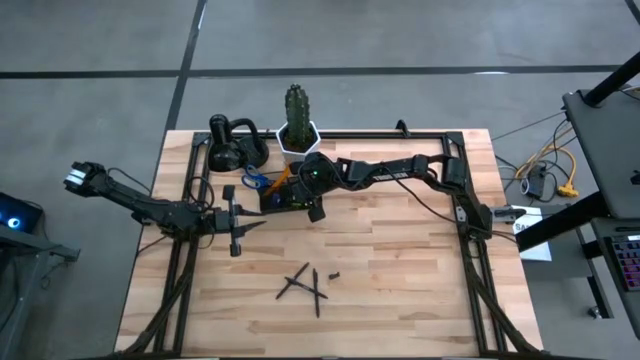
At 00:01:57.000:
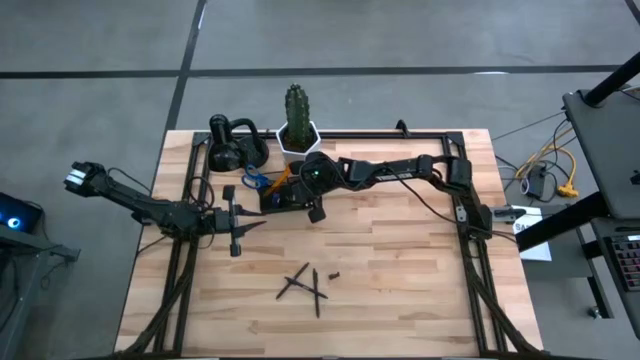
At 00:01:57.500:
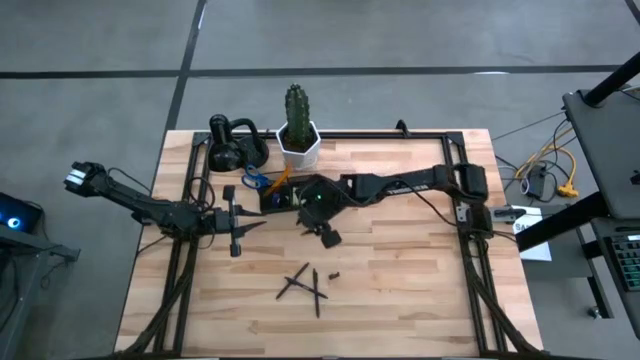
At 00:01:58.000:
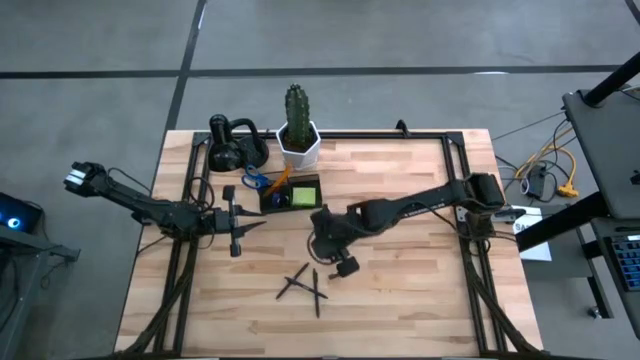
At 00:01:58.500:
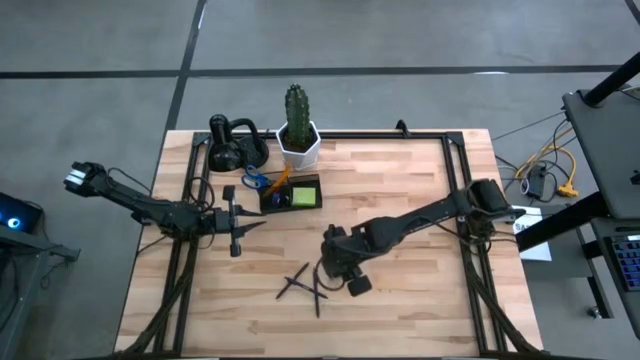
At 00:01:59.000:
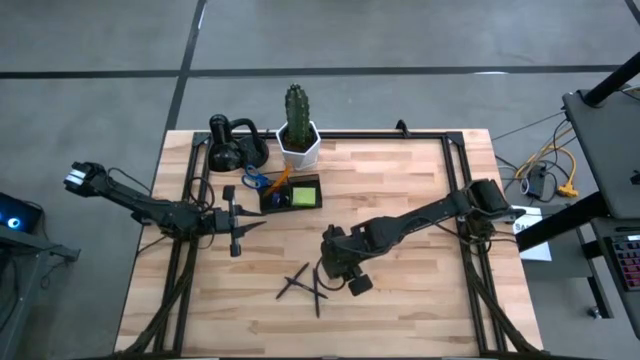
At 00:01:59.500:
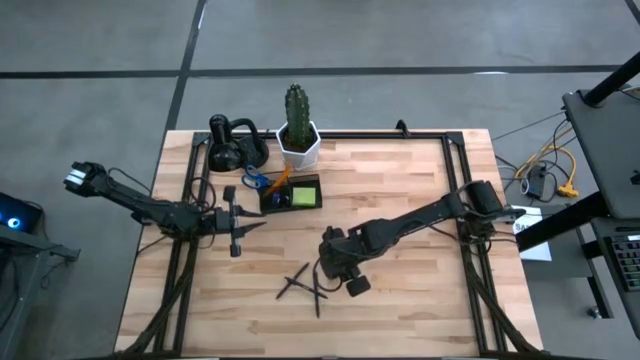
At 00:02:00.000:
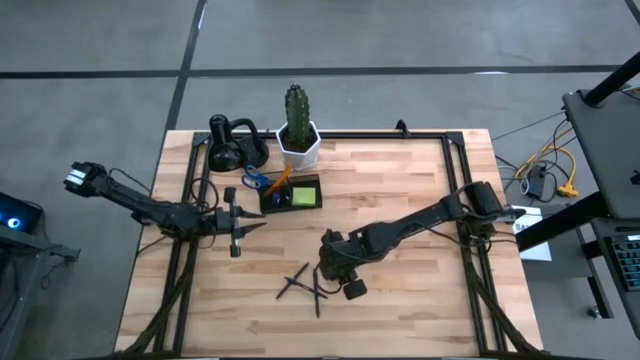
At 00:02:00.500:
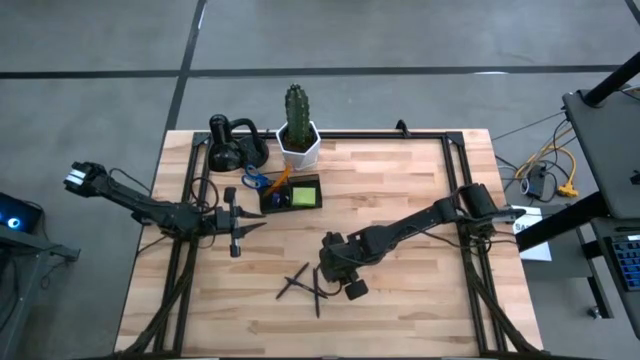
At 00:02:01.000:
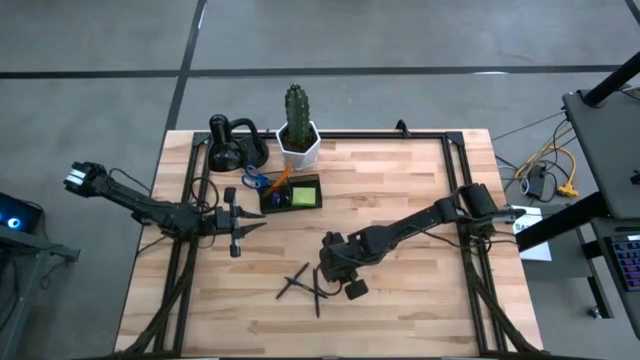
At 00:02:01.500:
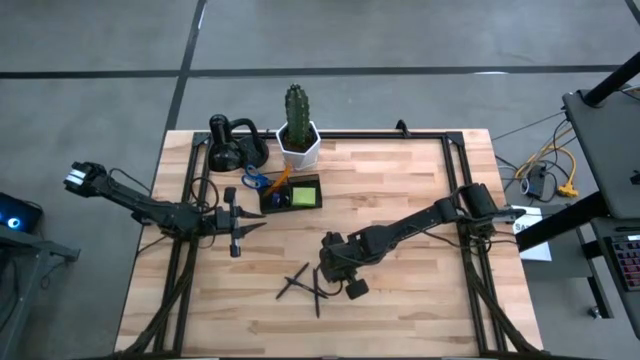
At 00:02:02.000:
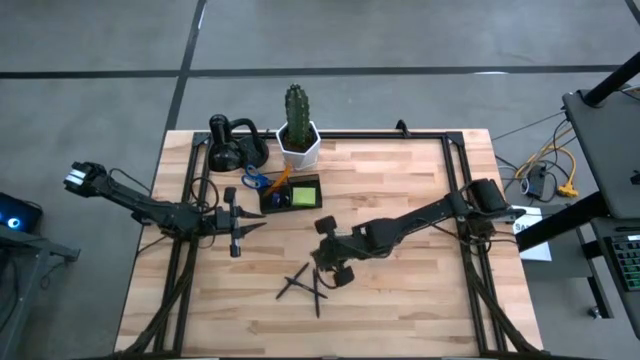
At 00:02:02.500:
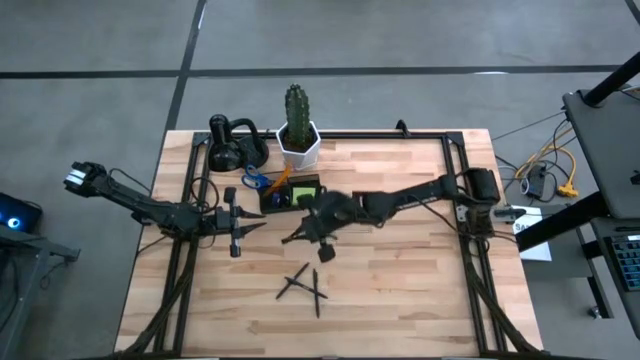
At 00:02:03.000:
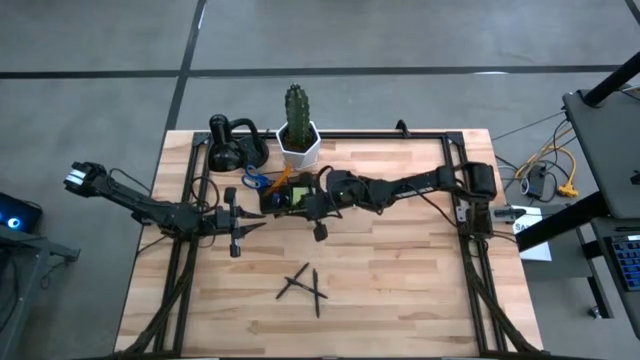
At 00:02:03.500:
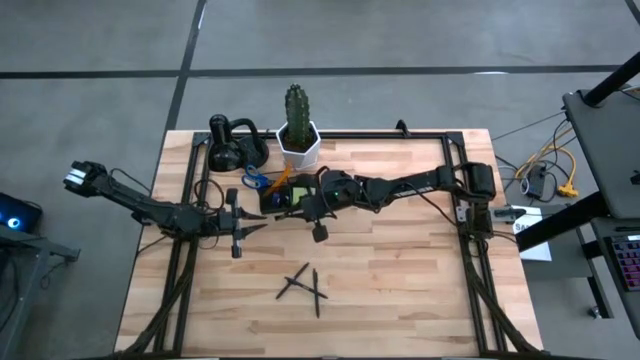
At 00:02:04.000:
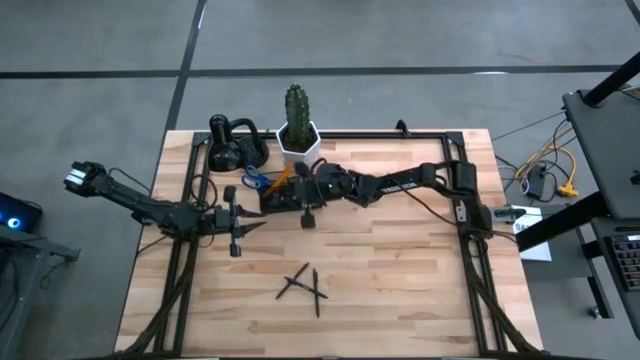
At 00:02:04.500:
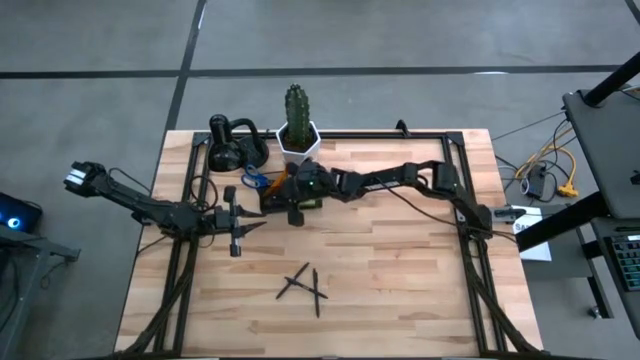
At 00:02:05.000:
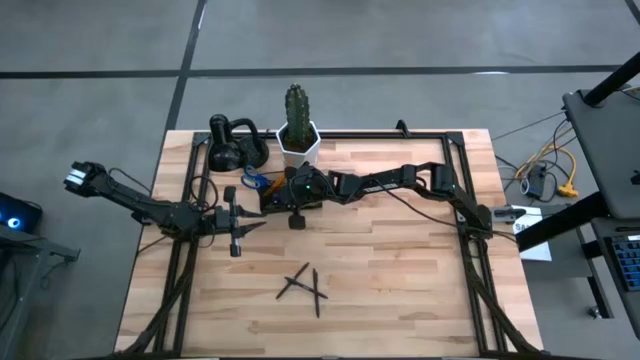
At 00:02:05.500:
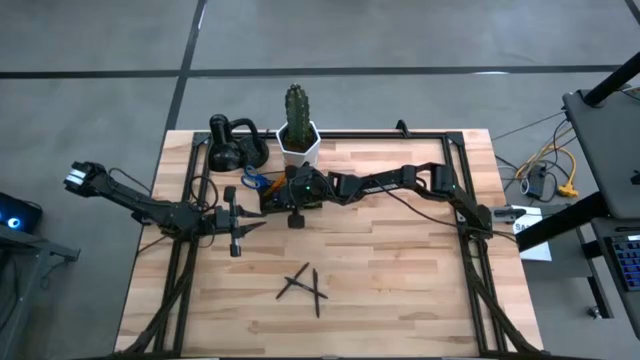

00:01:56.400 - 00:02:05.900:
Task: Pick and place office supplies into organizer
Put the black binder clip into the black desk organizer

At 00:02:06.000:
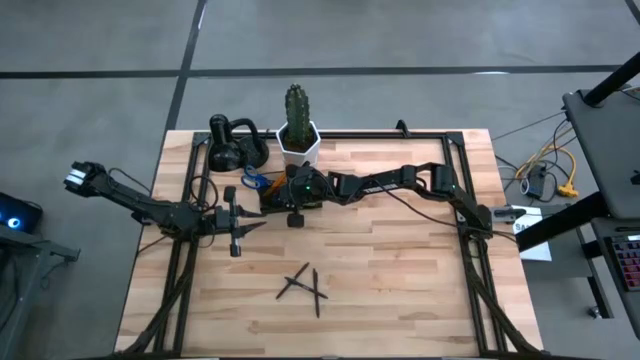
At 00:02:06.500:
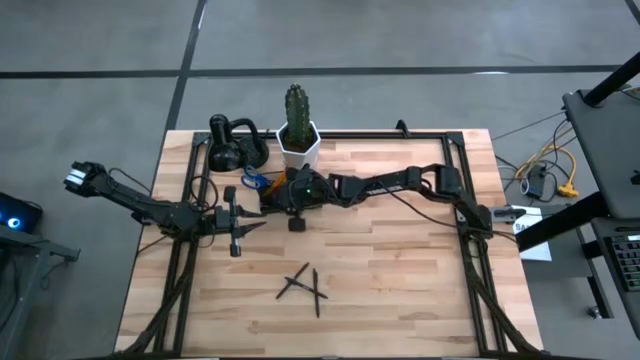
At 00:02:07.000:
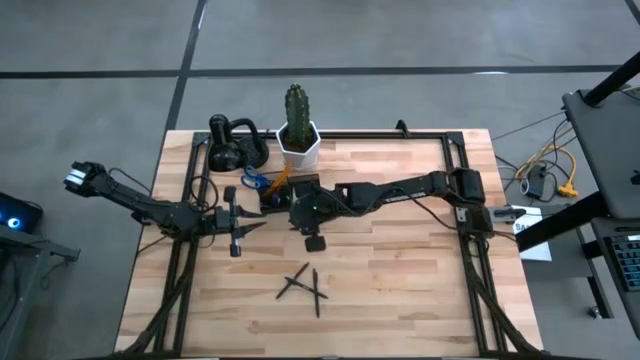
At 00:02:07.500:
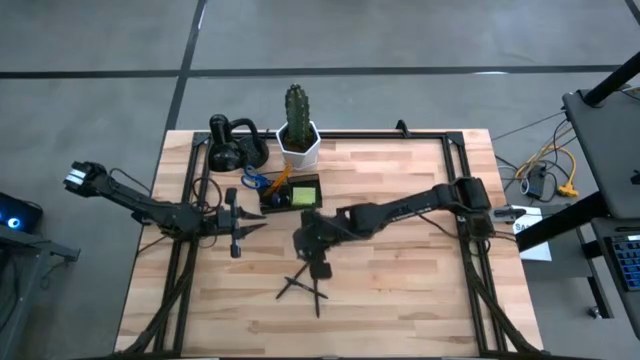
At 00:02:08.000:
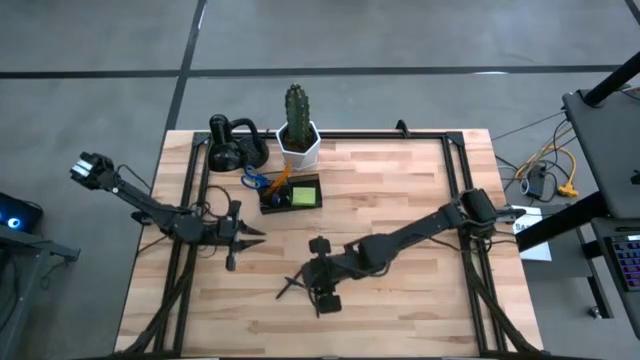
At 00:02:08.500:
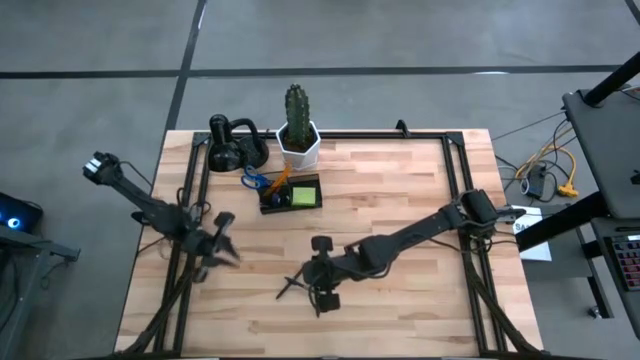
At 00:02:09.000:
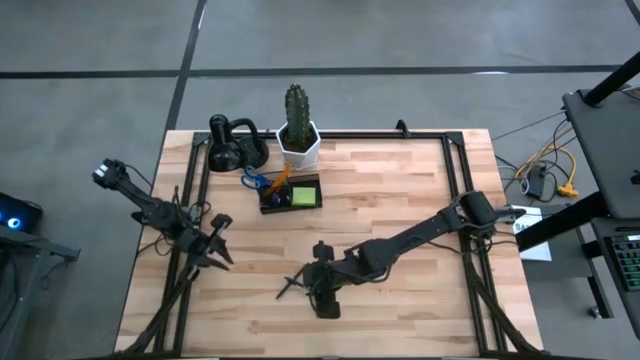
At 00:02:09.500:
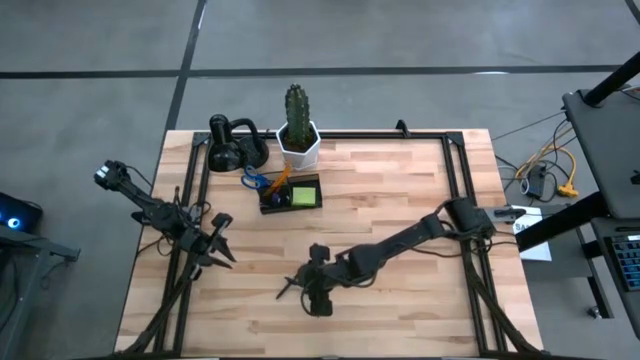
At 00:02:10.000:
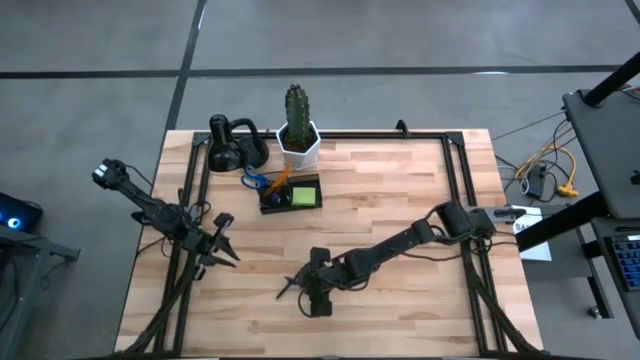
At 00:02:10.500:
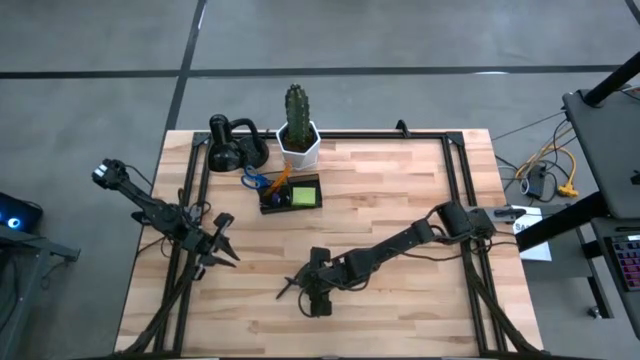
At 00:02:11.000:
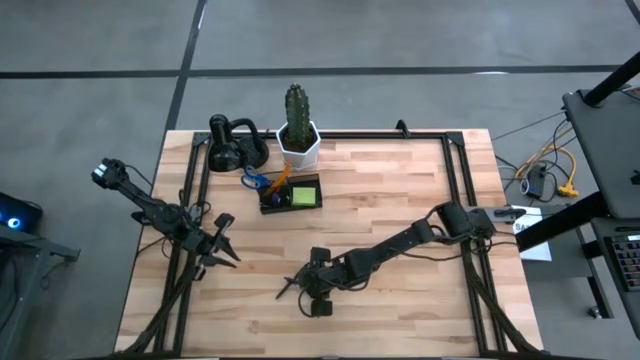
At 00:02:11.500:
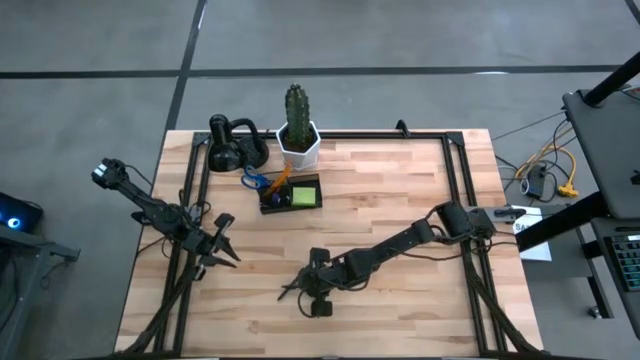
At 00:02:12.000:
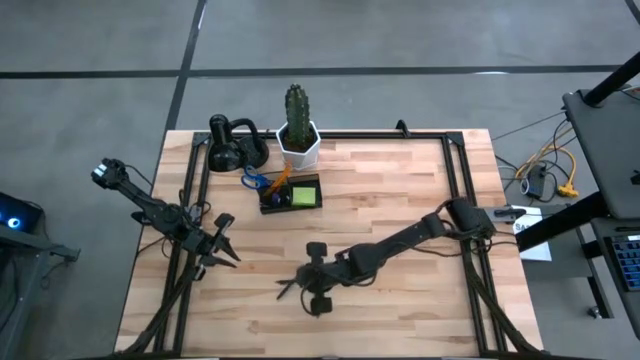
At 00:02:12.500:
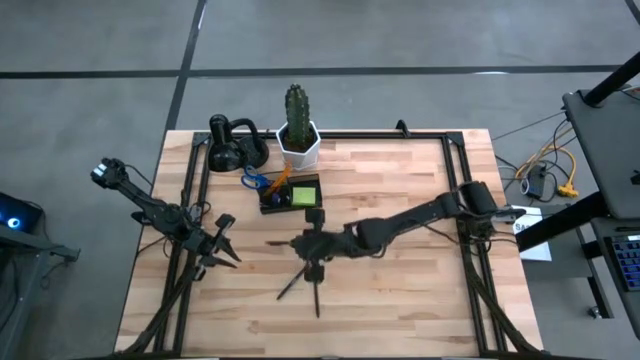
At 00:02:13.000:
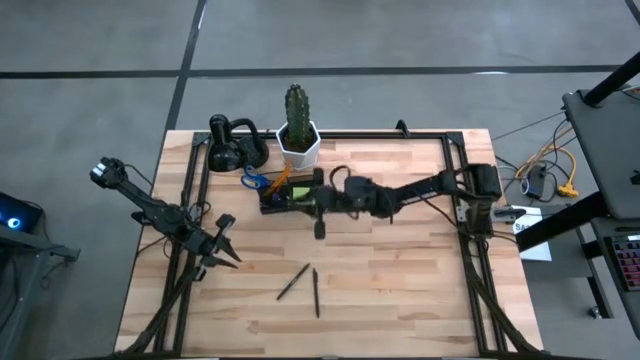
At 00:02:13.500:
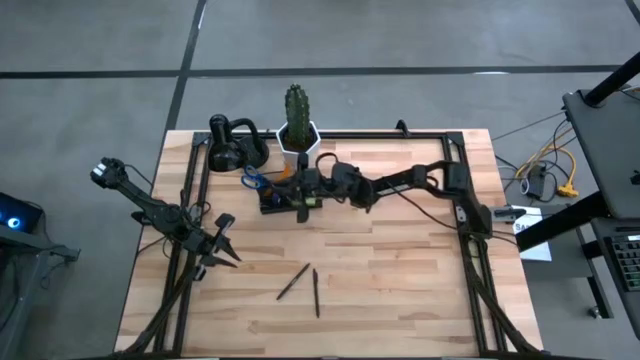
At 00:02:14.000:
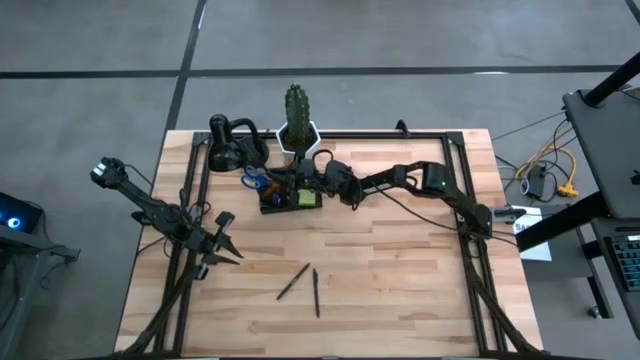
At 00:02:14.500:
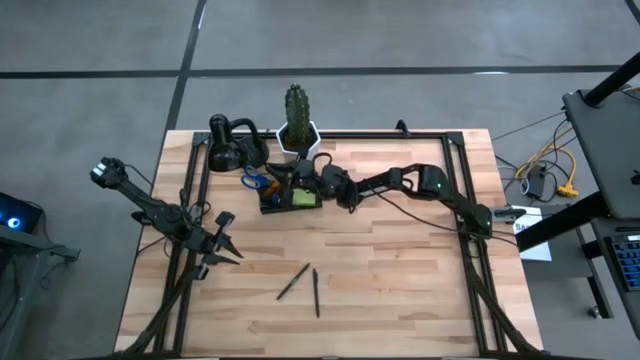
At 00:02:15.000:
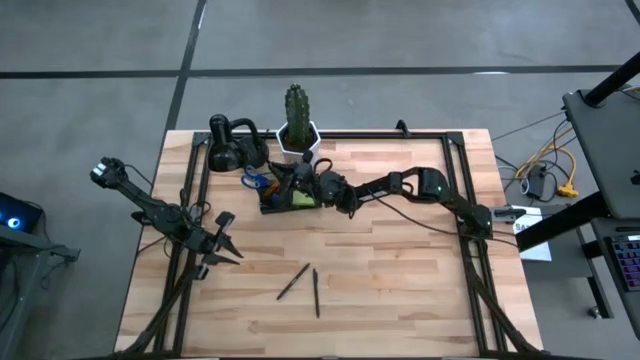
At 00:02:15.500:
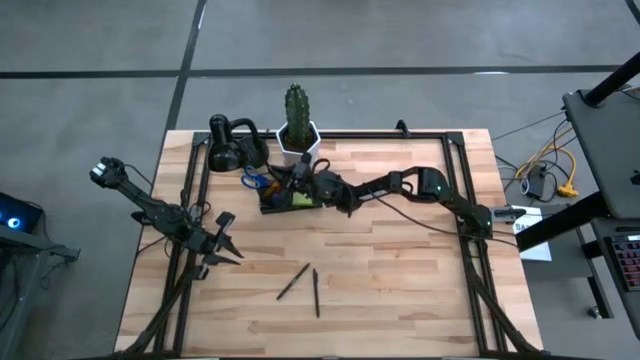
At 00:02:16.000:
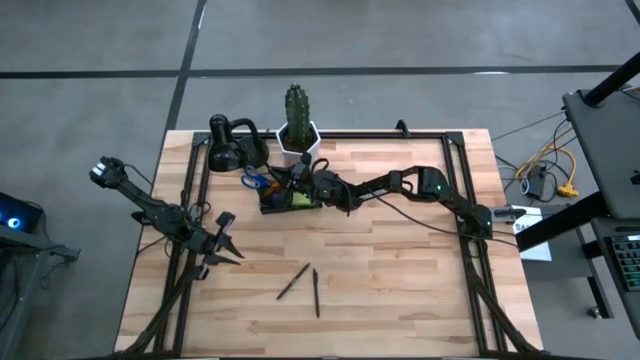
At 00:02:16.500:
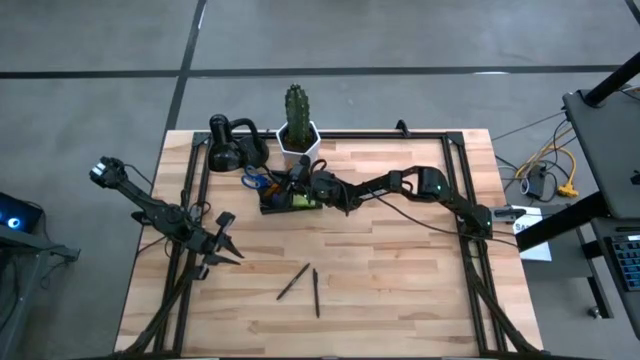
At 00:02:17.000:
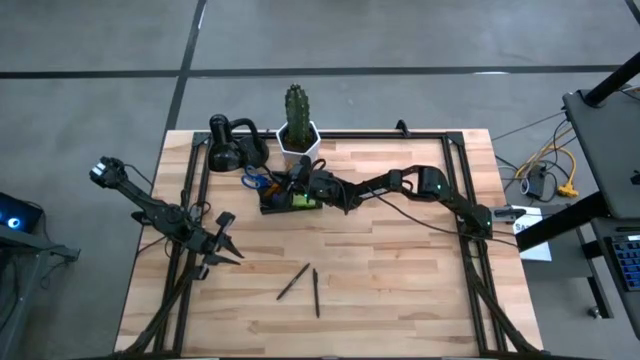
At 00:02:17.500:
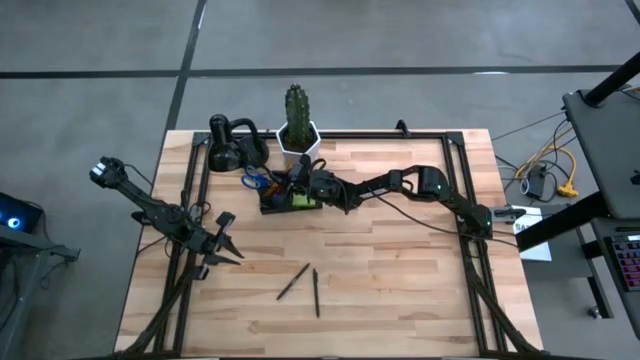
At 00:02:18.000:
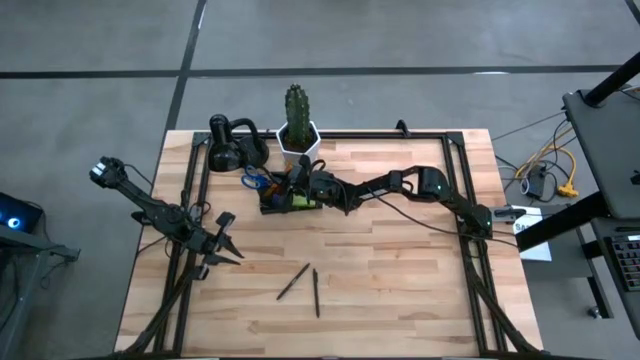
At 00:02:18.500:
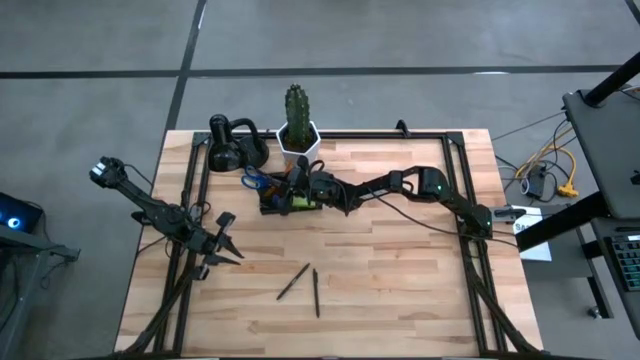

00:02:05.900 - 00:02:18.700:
Put the middle black pen into the black desk organizer
